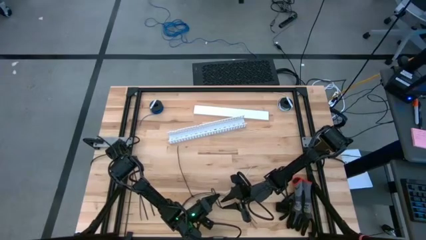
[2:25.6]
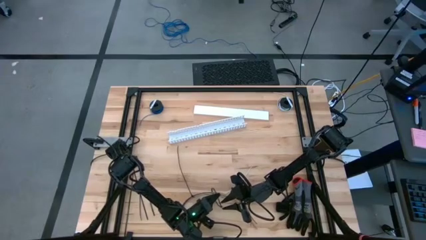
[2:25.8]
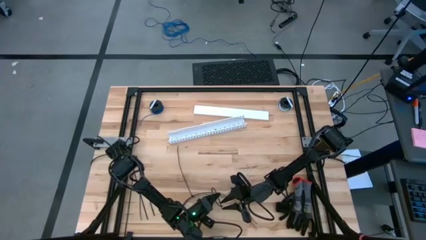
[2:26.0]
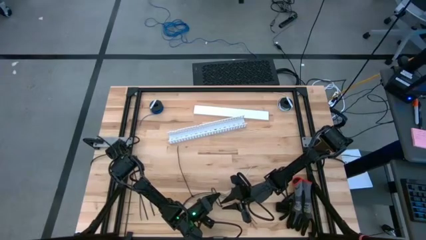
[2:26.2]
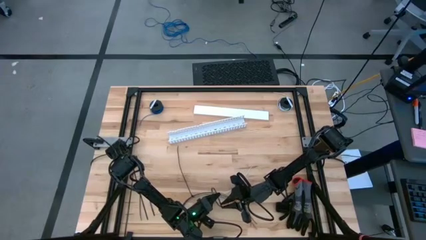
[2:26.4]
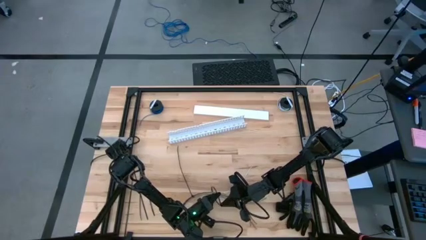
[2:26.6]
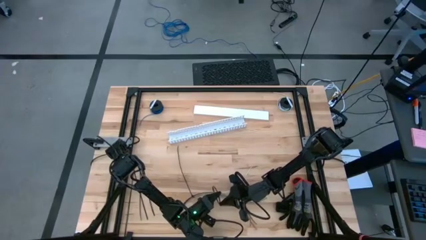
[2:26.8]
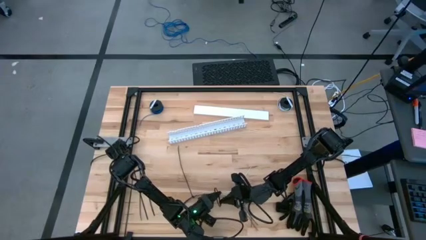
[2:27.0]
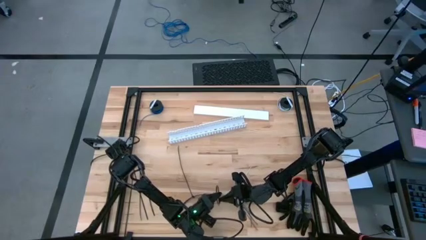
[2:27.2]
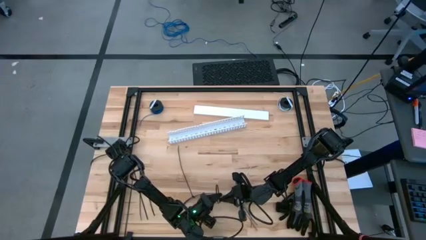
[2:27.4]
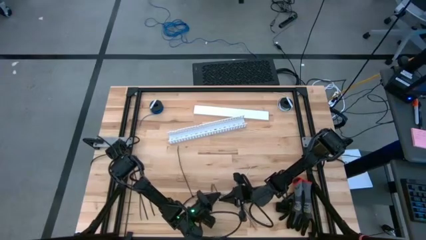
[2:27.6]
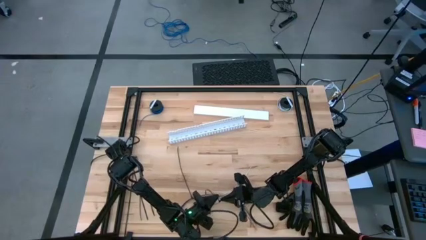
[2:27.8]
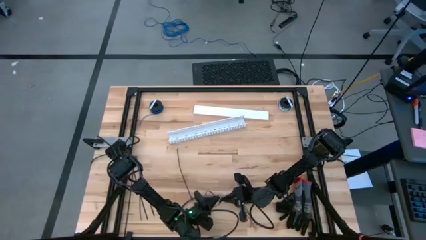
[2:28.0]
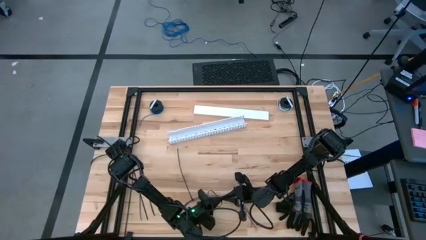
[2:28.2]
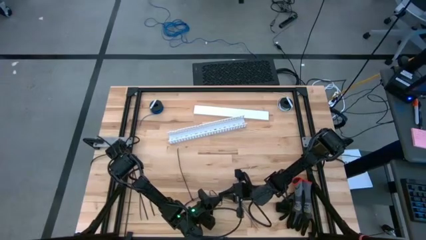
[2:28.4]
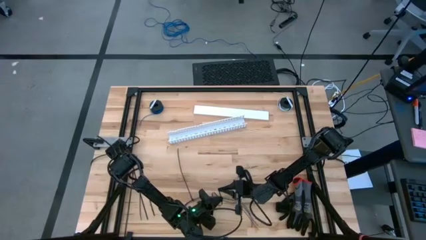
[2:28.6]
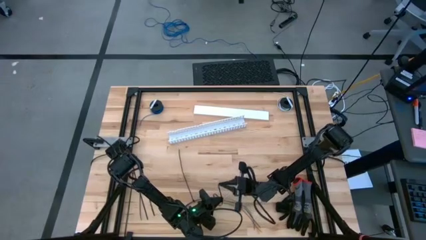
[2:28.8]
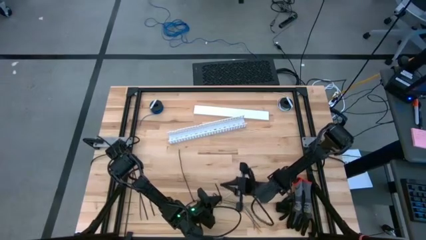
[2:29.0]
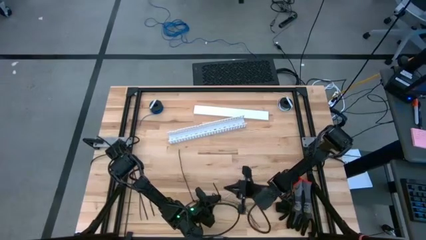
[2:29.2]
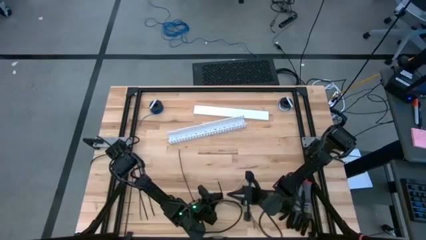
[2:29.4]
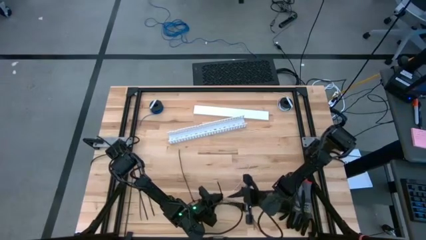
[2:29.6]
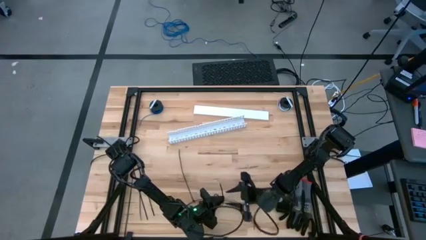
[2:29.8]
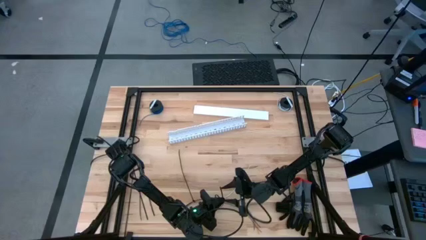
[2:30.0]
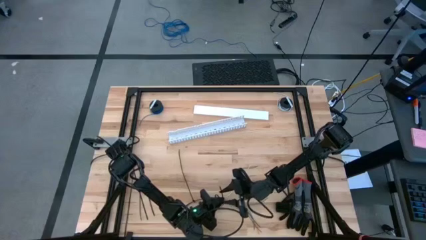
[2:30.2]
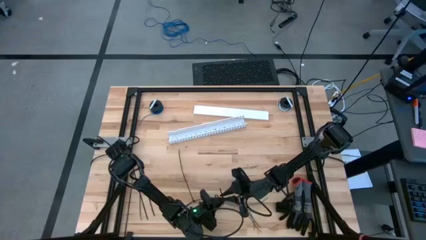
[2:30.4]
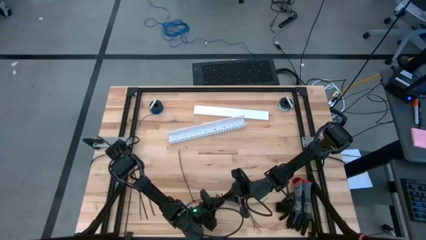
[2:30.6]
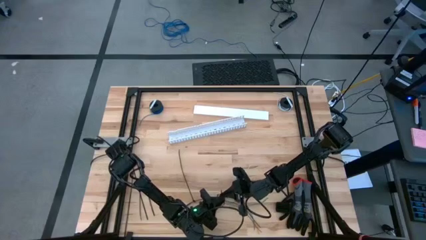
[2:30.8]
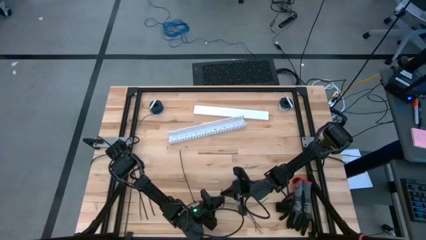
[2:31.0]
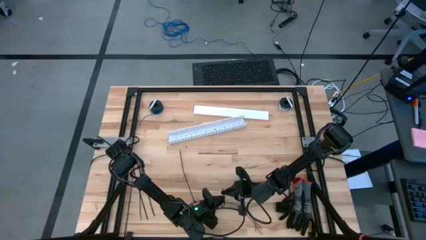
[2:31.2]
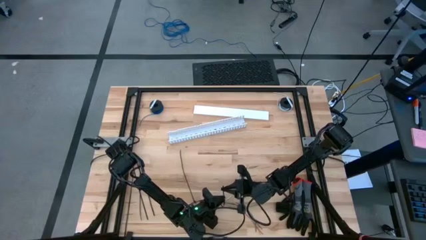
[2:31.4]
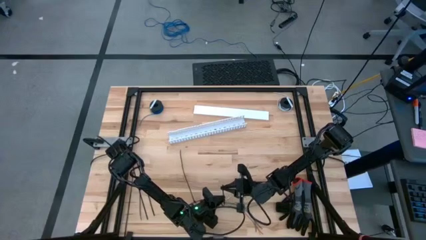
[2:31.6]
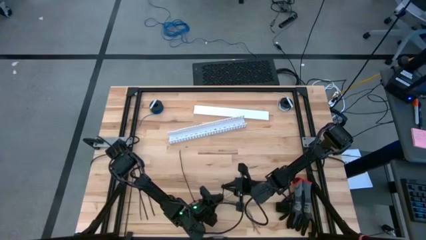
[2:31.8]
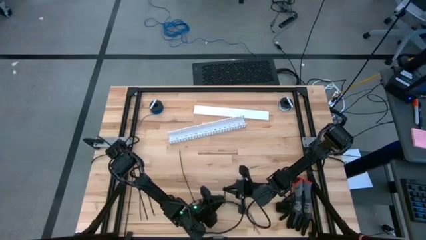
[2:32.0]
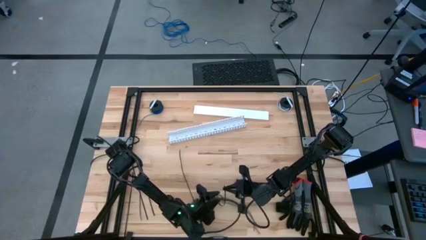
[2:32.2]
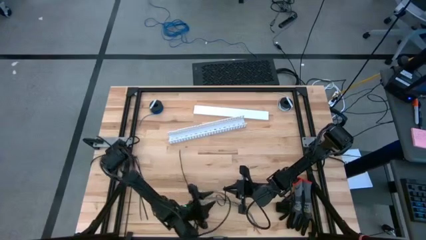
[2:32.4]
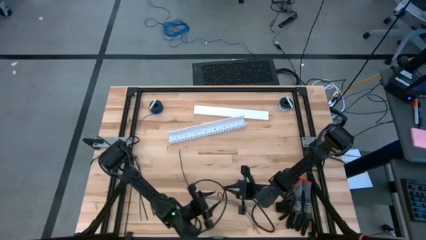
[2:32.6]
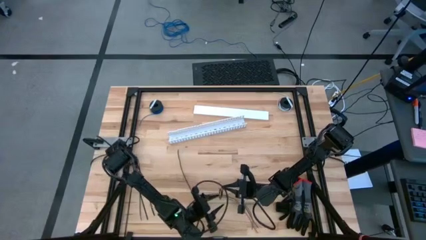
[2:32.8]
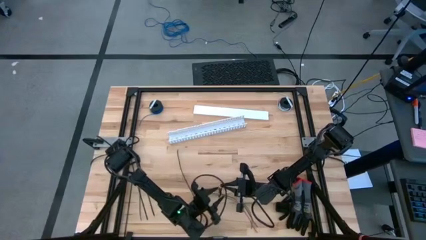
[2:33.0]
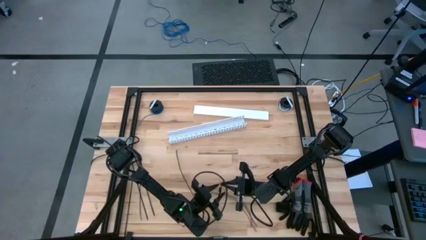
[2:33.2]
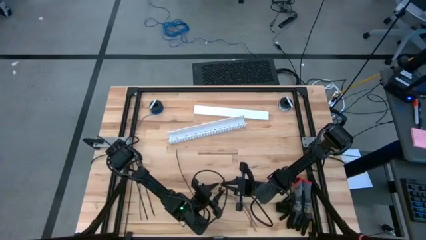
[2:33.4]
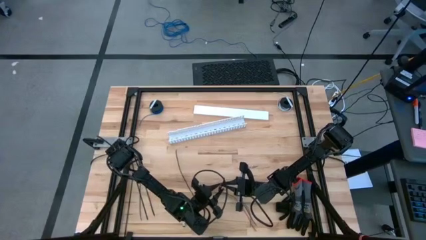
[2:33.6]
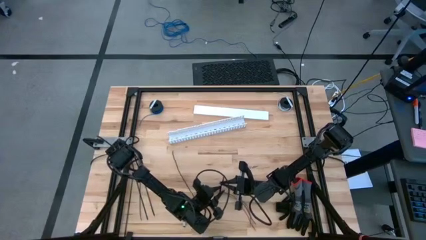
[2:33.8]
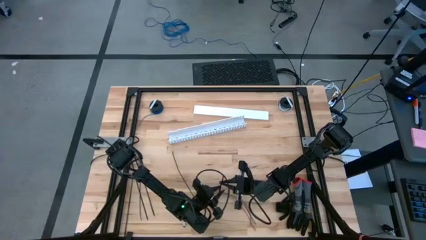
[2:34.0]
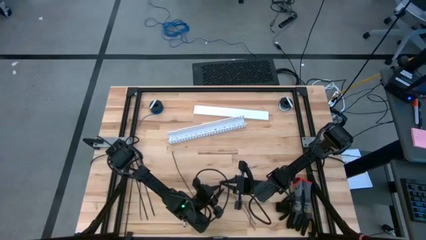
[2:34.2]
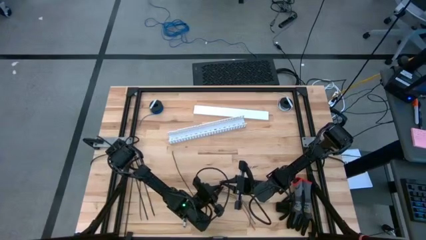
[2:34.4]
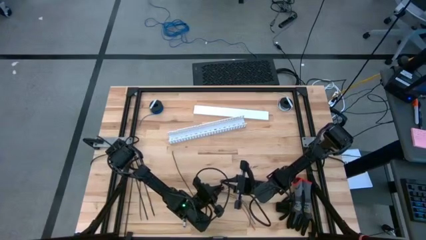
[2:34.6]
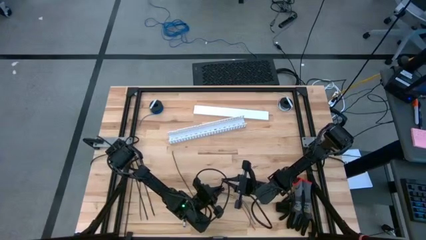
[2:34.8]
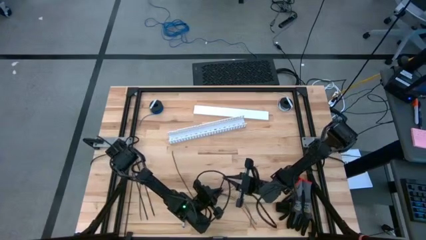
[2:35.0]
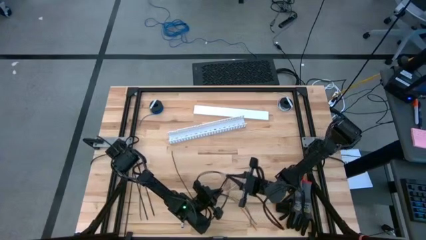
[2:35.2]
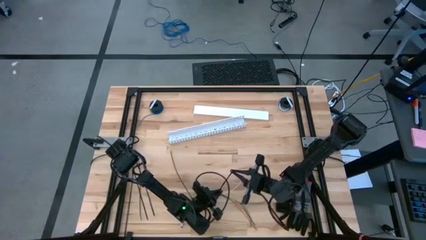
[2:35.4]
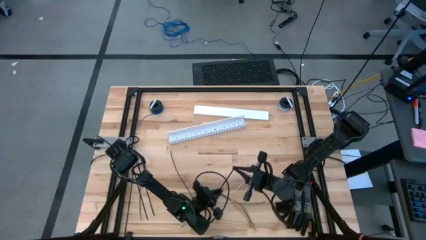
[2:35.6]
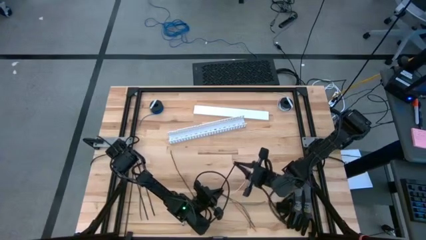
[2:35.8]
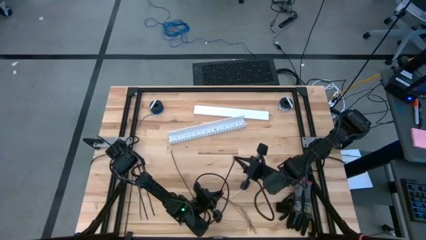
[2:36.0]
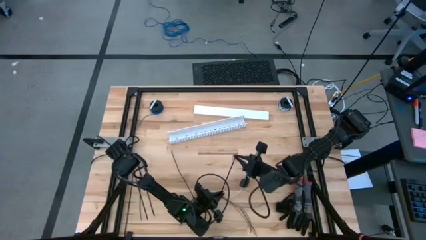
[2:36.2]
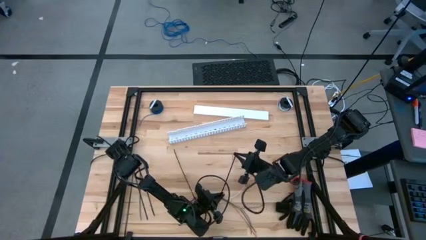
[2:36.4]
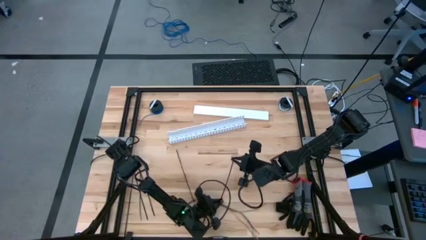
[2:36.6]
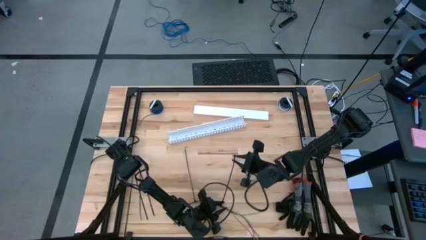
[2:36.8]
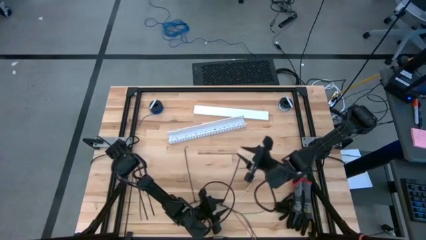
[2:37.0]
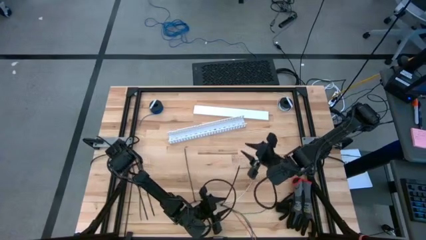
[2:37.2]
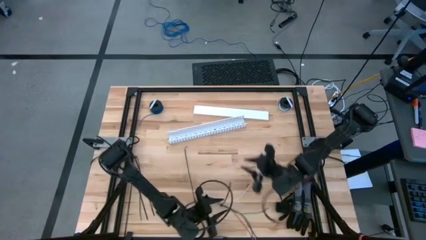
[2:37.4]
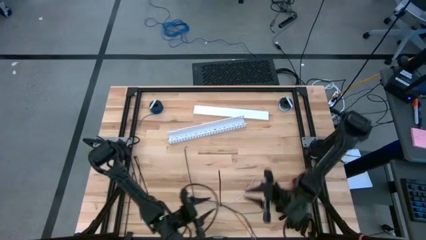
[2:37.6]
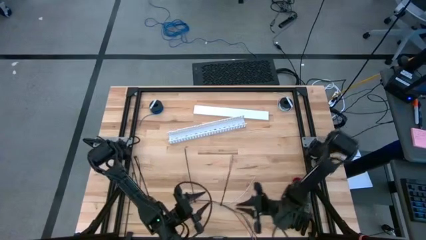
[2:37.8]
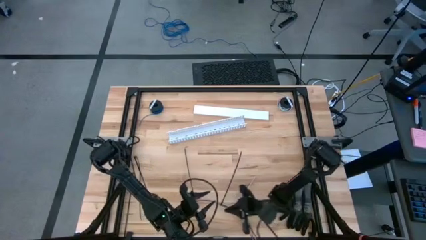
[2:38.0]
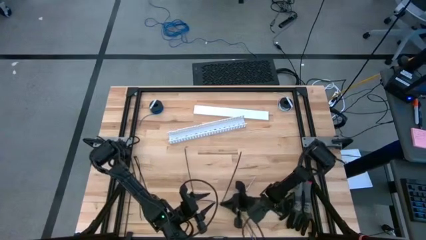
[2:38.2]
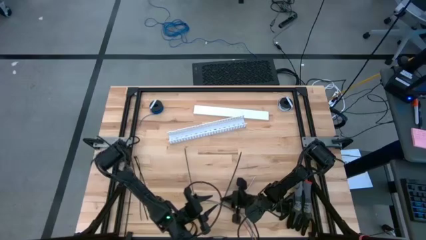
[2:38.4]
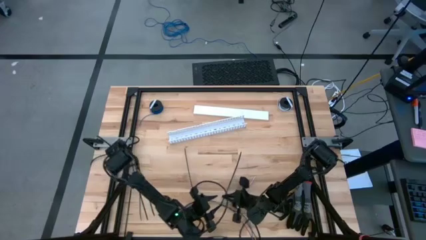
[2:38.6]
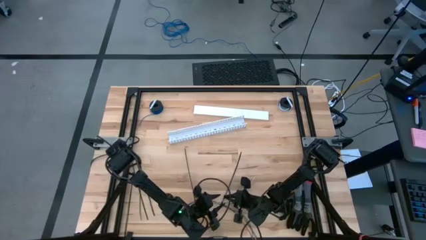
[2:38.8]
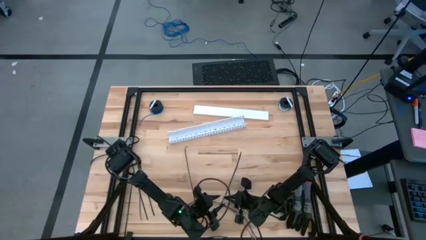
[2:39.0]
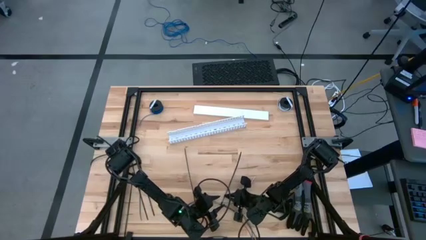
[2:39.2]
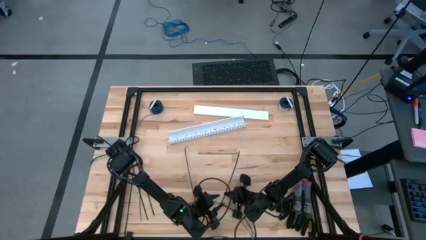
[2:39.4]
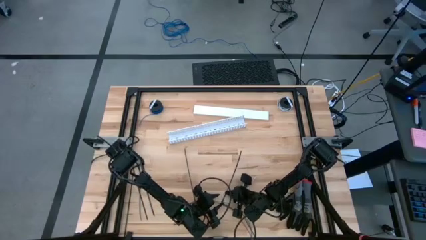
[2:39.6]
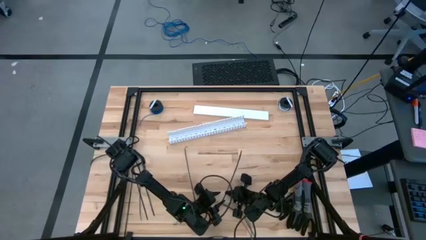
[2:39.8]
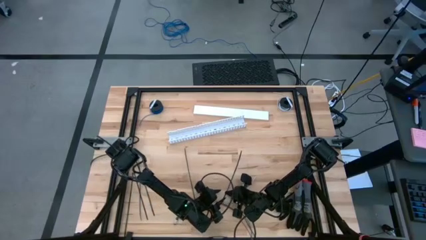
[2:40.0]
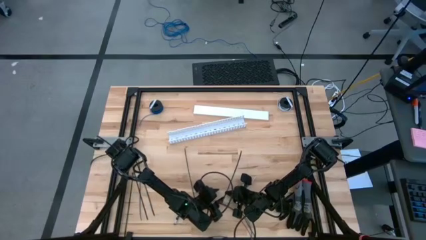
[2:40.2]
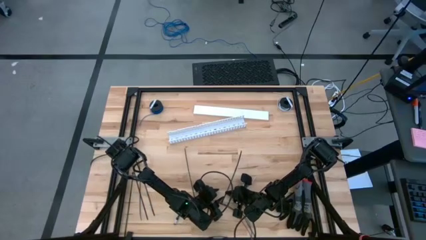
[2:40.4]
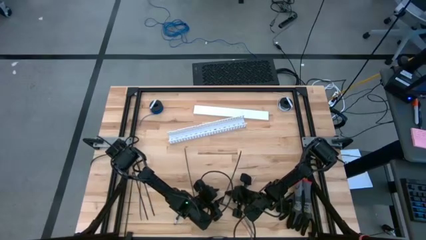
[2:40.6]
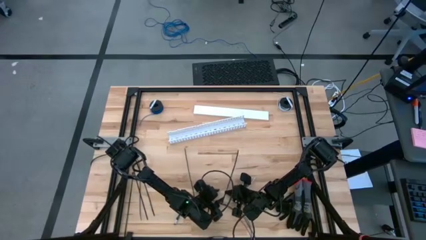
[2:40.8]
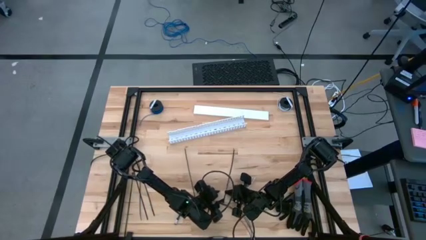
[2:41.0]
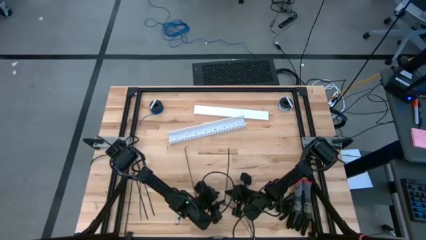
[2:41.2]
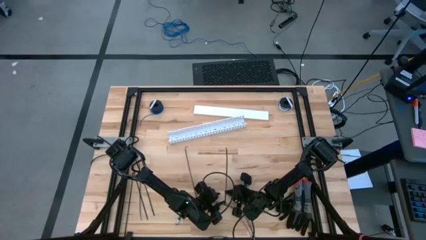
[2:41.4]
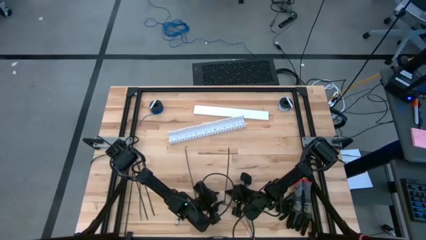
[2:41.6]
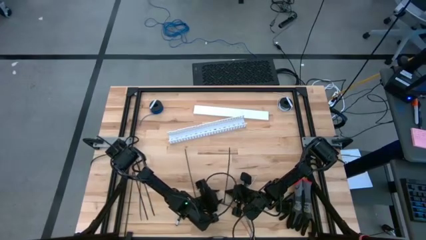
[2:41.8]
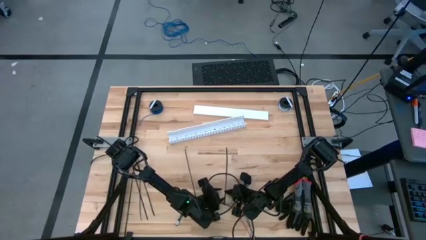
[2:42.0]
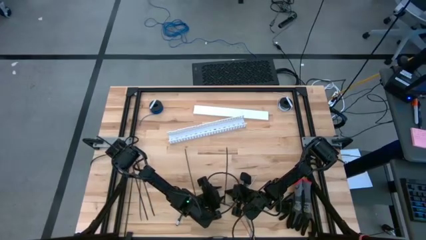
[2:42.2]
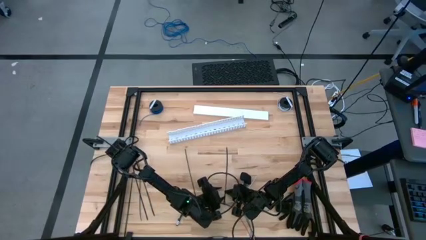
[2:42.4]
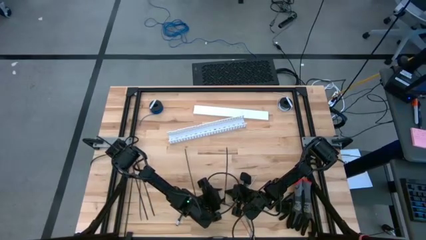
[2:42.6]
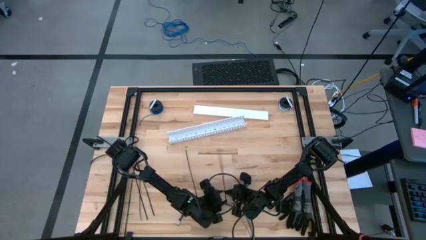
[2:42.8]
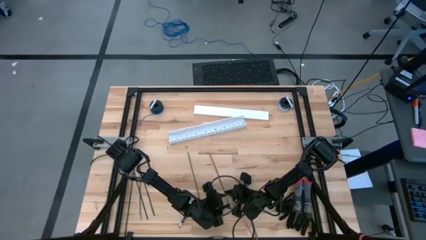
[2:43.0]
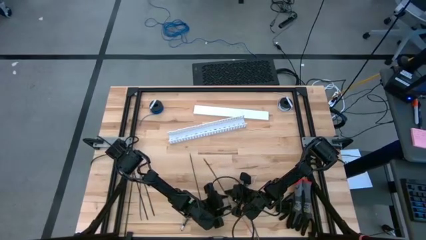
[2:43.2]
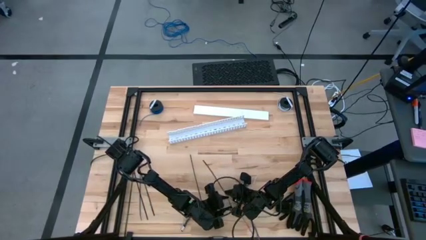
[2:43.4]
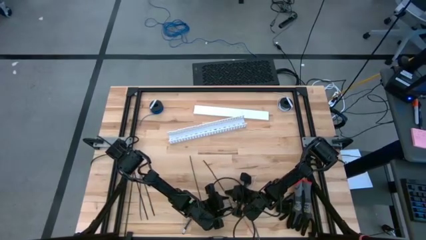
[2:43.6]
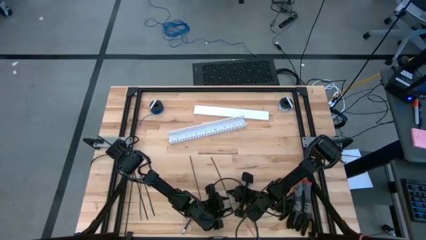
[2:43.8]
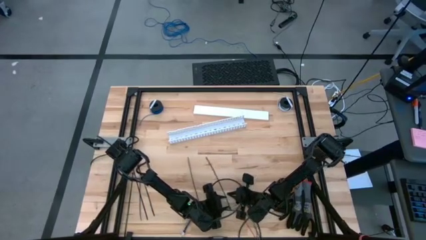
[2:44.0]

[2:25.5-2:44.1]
Task: Ziptie cables
Wrap the colored loose cables with the black zip tie
